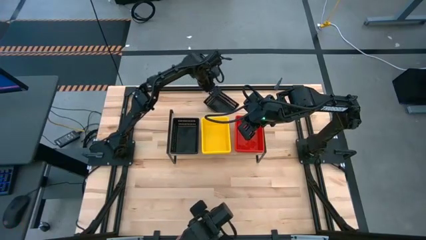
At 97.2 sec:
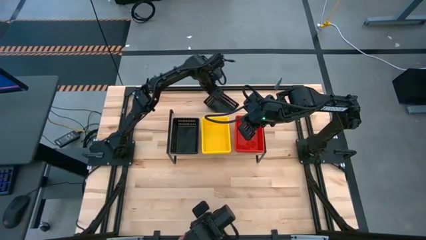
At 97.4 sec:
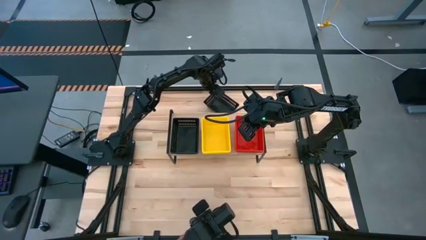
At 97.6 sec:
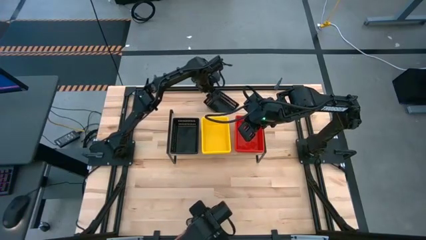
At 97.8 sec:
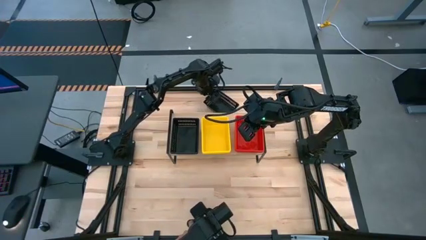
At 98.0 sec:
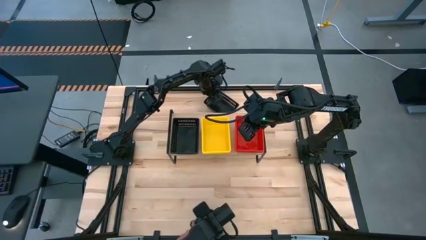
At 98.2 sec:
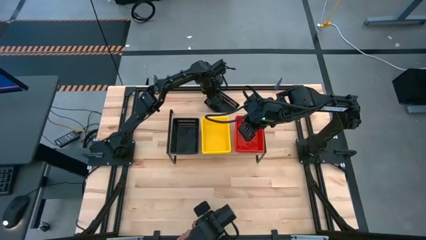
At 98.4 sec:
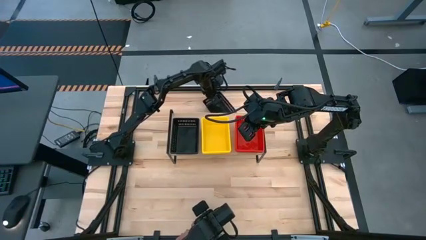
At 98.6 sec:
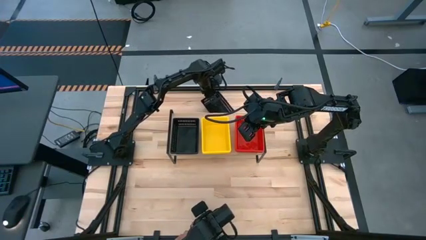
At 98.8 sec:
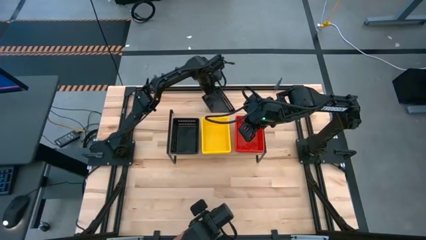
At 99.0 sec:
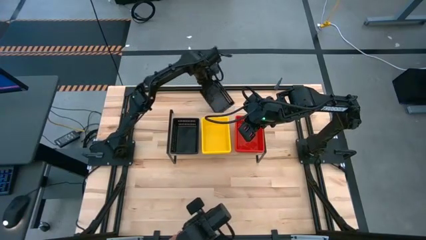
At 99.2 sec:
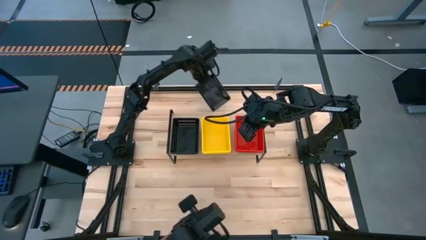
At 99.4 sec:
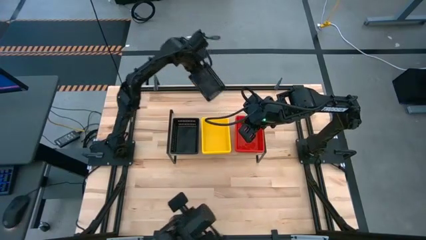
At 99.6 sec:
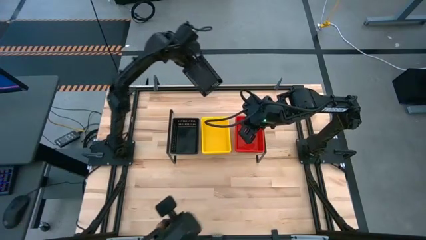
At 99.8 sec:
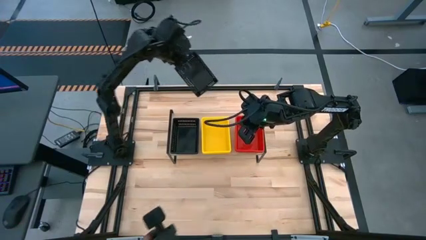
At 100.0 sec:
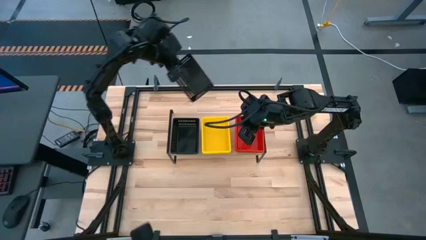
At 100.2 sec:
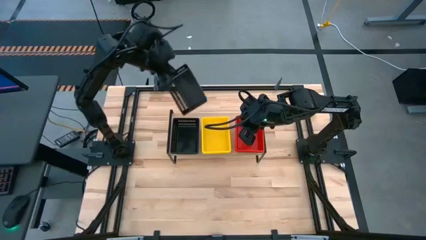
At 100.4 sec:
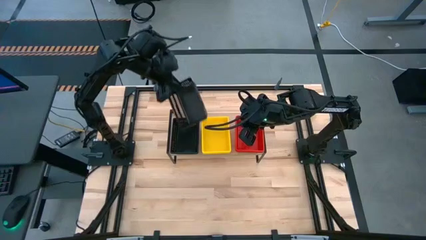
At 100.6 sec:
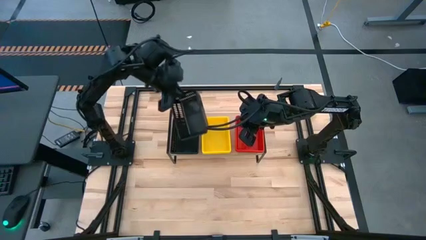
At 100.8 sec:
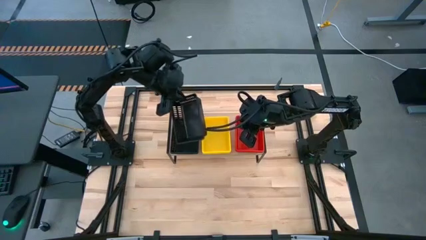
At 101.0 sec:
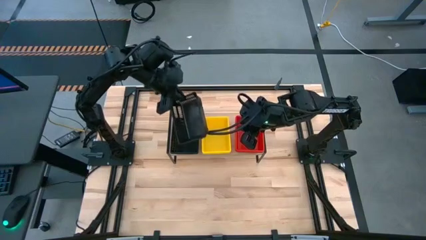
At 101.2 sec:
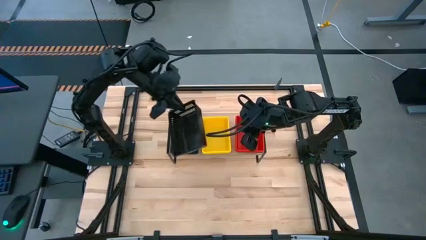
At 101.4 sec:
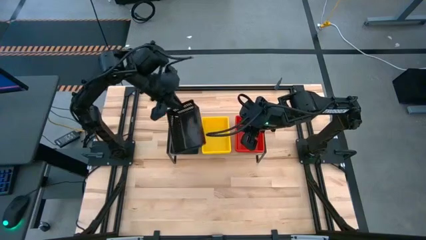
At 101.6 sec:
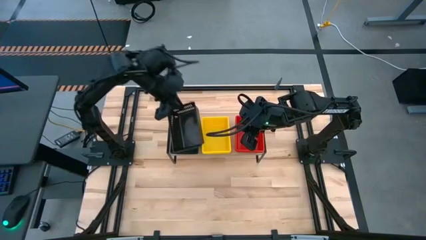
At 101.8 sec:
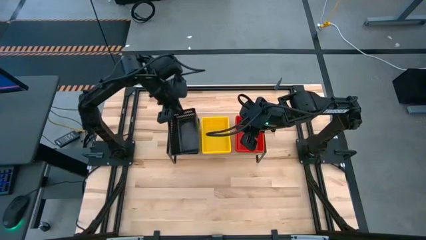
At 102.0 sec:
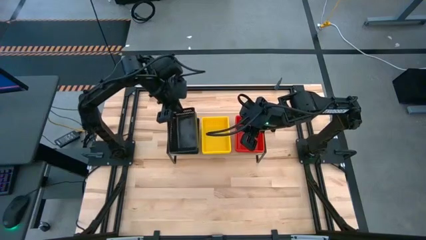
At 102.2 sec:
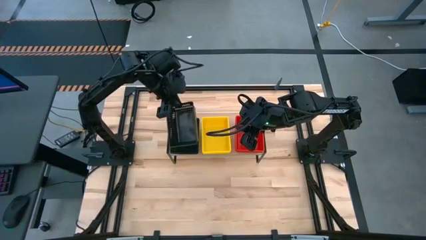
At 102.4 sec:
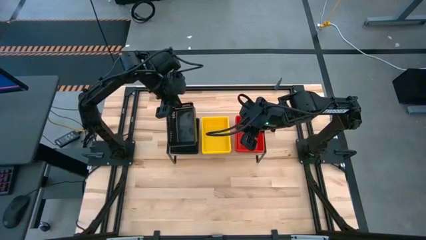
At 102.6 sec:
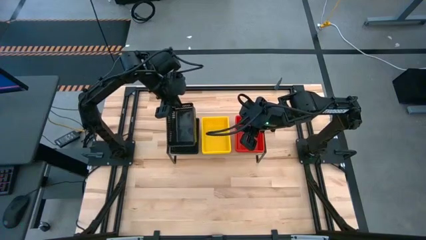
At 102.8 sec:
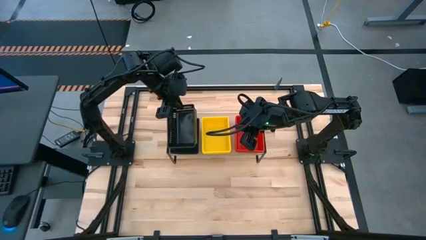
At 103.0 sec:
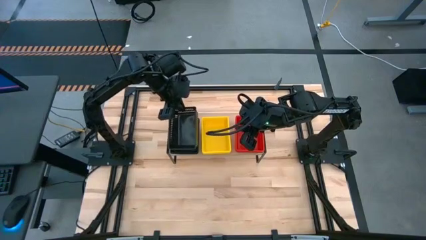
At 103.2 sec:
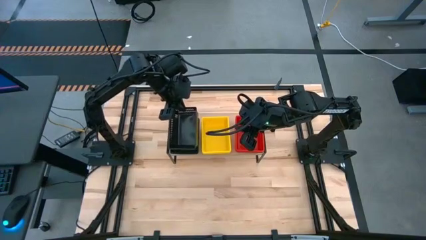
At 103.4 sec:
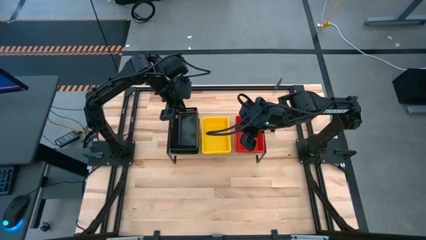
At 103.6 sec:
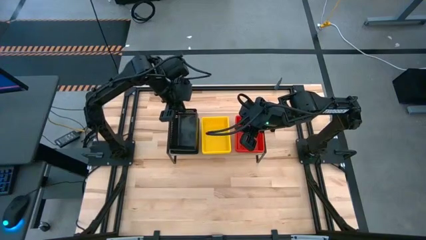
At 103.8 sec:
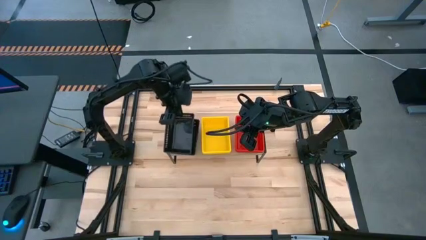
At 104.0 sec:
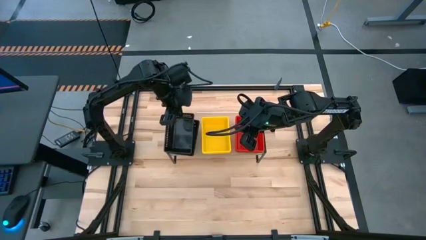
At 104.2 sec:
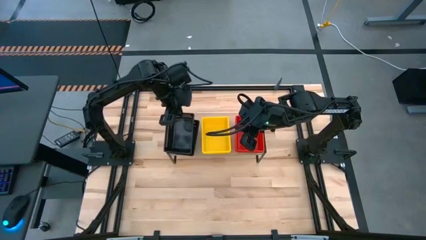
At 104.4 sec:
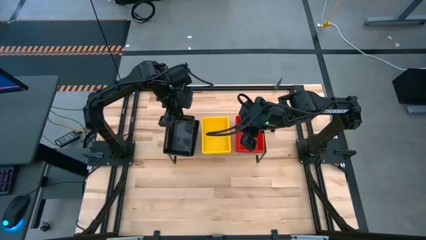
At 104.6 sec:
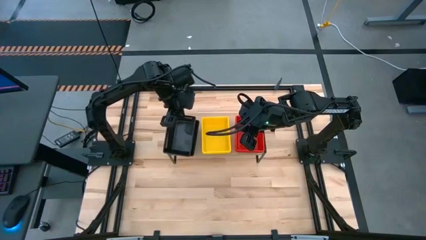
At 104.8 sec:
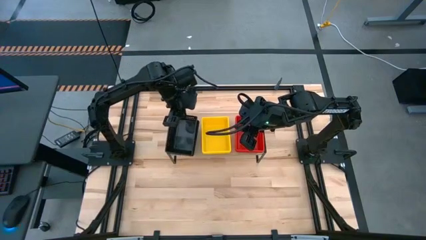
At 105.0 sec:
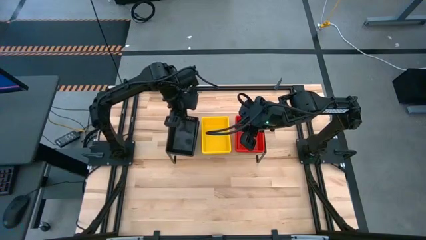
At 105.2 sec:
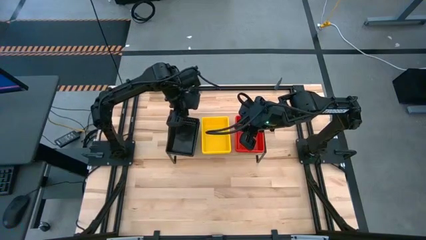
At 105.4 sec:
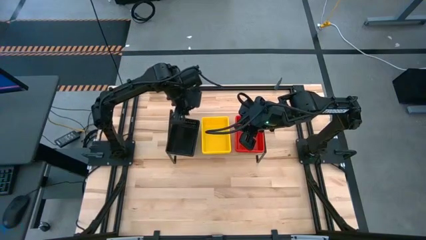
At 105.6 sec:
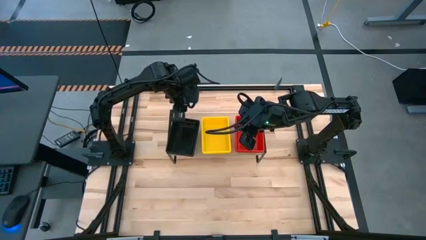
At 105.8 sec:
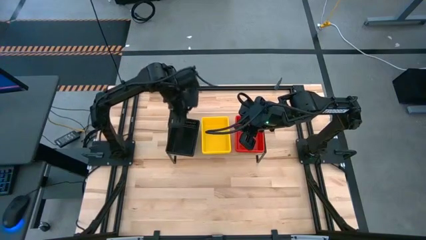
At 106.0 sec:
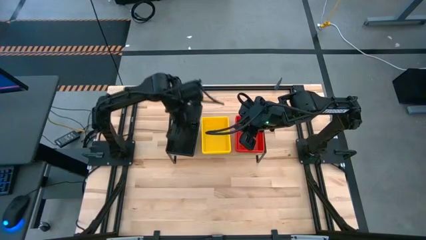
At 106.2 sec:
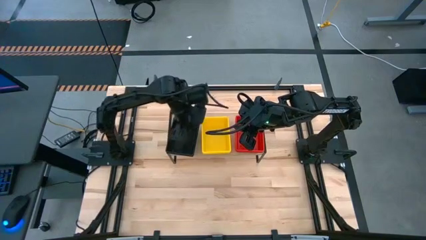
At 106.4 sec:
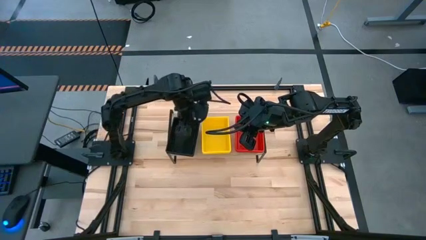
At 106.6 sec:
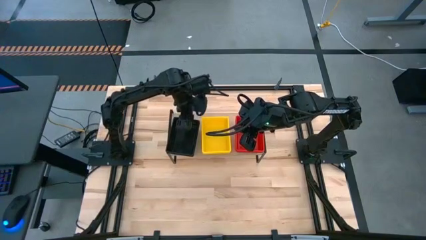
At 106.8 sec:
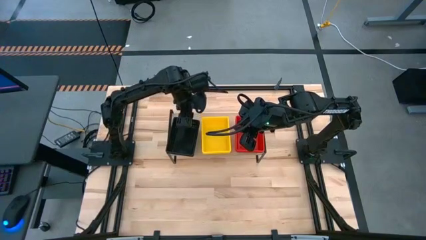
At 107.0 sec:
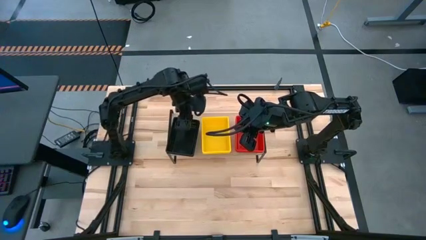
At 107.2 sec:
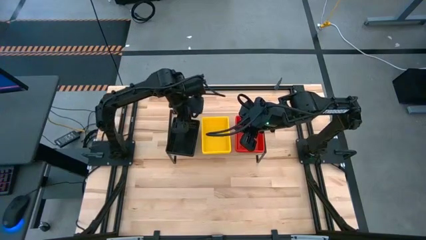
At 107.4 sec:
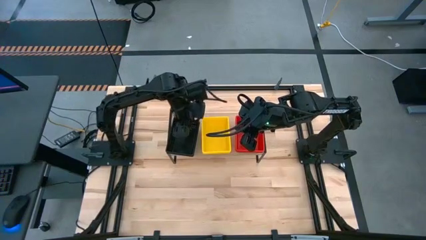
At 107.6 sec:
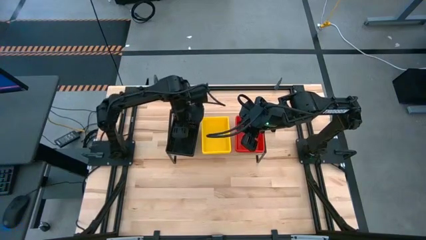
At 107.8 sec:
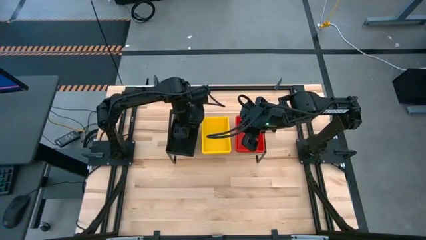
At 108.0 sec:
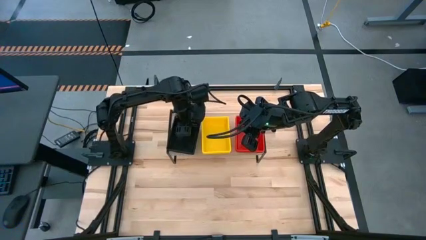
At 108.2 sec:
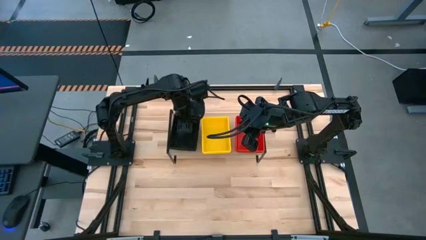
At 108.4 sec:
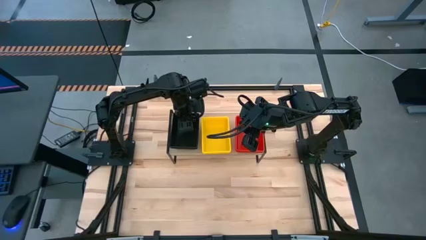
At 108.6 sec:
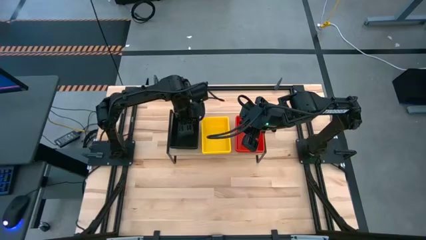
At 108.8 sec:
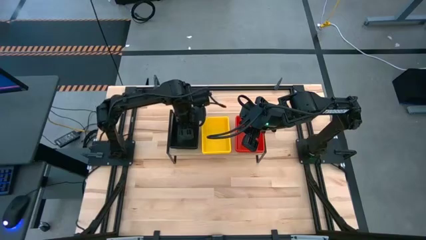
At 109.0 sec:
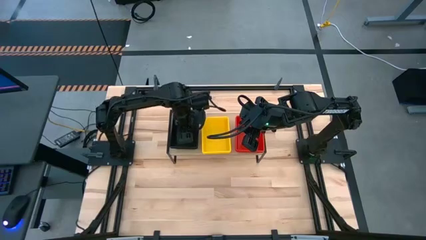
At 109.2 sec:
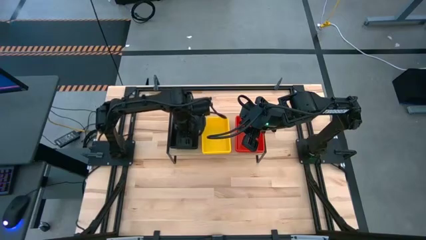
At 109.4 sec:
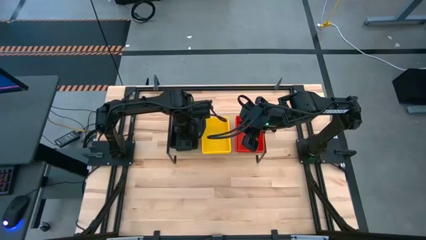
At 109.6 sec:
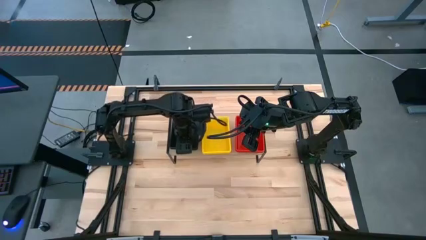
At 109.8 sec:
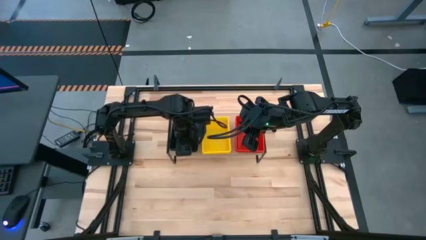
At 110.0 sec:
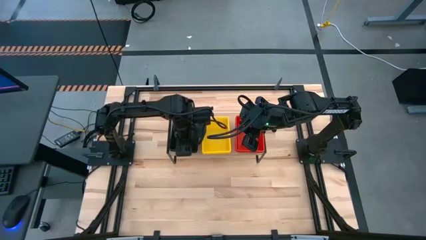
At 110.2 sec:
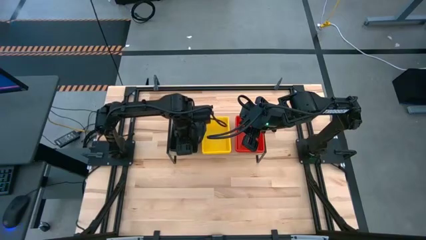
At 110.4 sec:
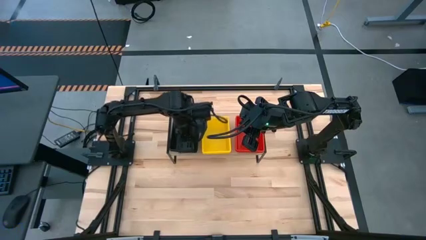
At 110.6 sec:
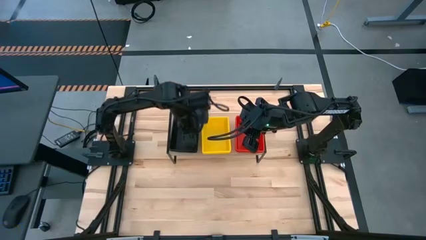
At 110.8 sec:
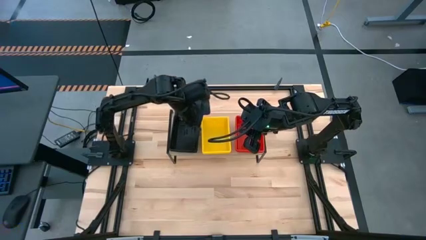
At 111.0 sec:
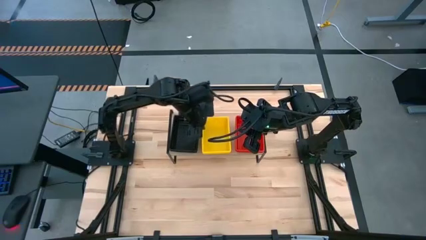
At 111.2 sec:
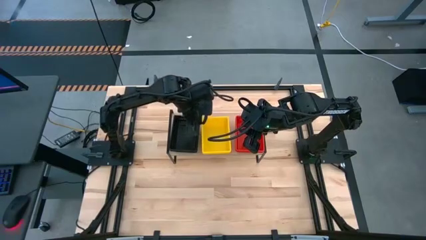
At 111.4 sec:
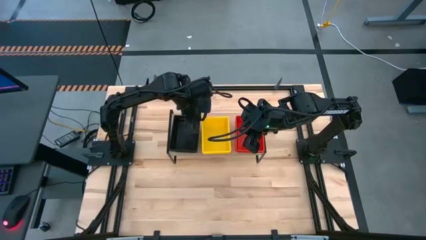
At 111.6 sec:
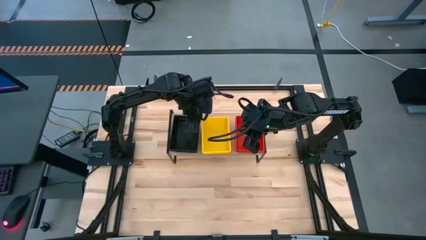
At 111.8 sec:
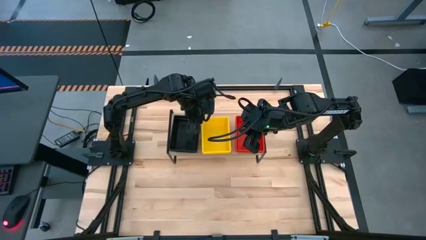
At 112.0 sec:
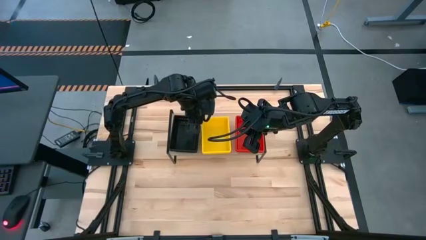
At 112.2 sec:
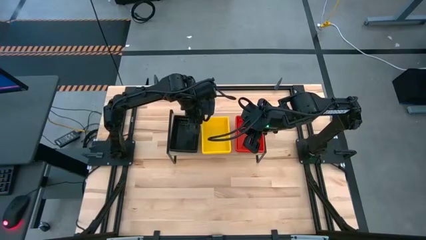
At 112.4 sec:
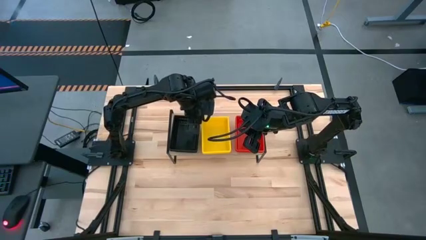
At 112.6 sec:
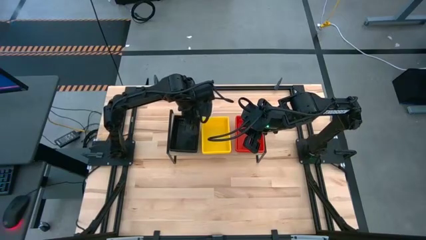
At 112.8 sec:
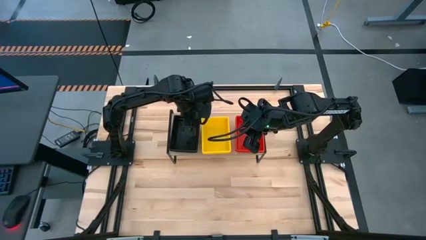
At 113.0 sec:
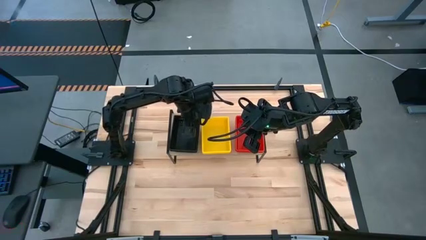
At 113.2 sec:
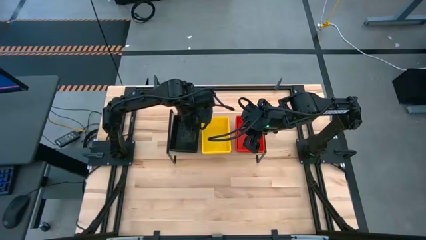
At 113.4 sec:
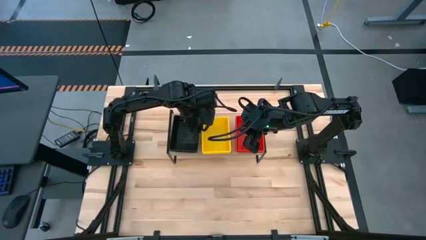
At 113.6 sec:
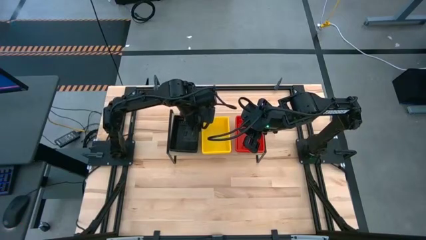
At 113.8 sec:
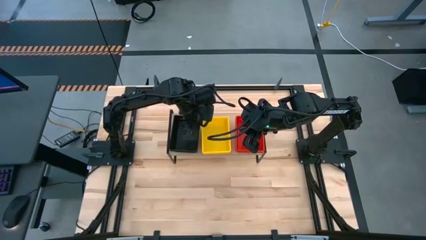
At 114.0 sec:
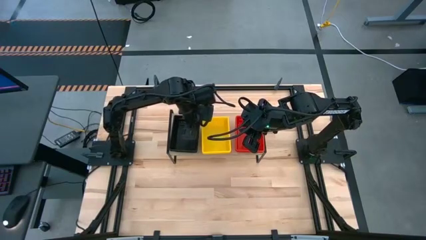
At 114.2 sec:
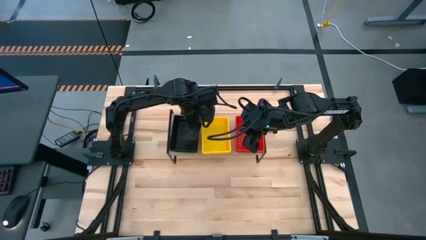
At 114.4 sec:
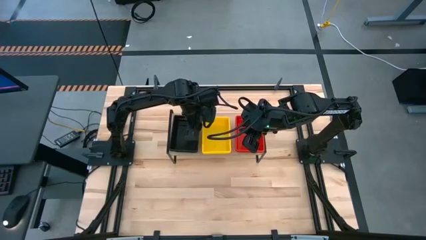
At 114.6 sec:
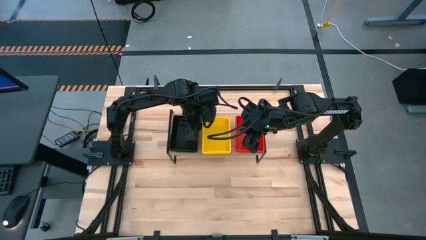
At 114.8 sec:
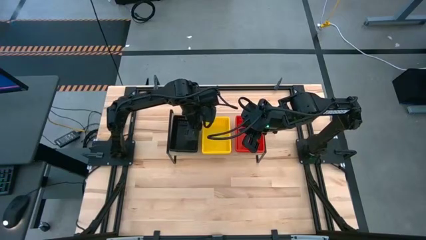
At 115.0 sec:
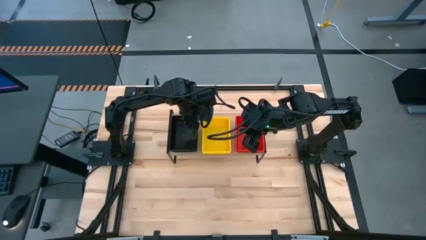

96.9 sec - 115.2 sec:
Task: Stack baskets on shelf by color
Stack the black basket on the stacked black baskets on the shelf
